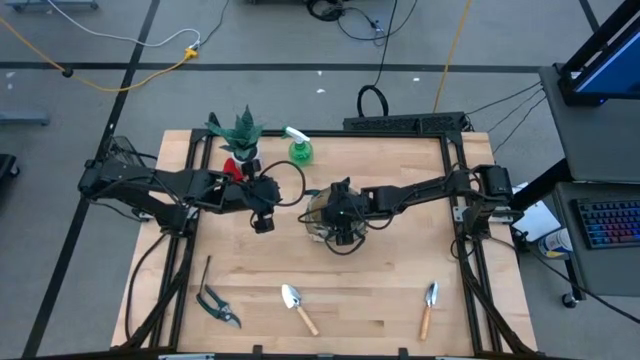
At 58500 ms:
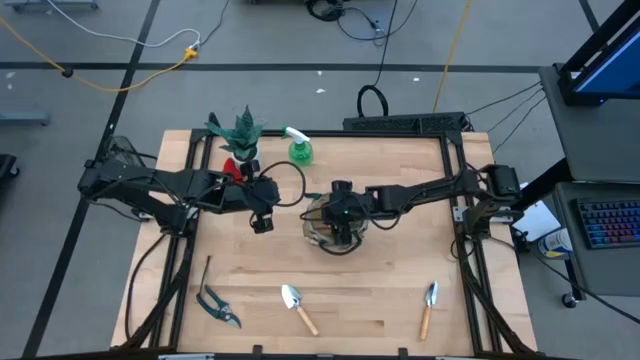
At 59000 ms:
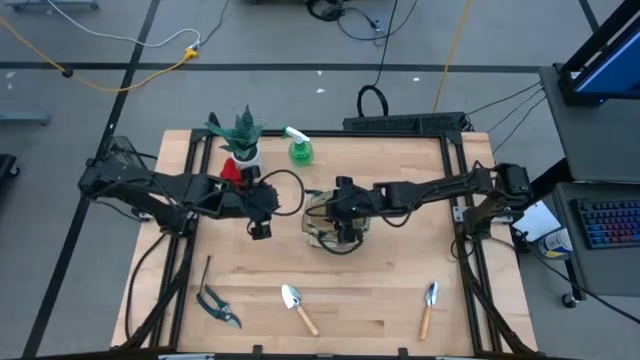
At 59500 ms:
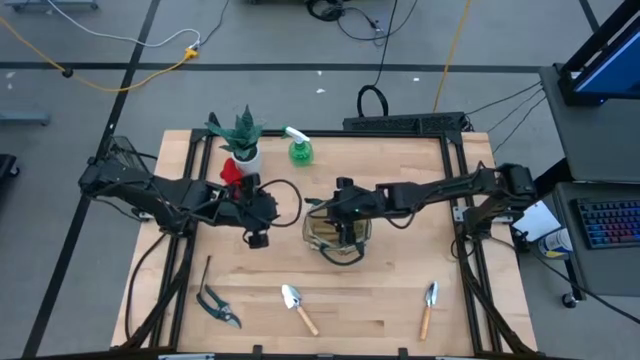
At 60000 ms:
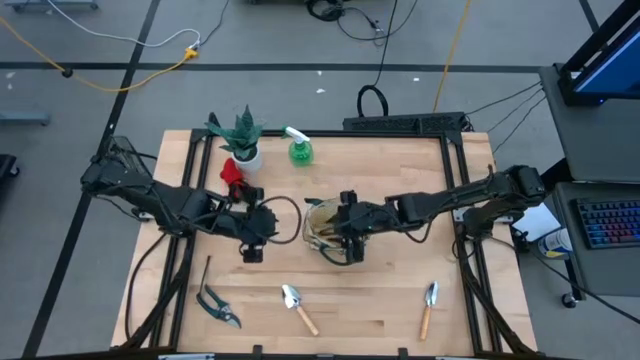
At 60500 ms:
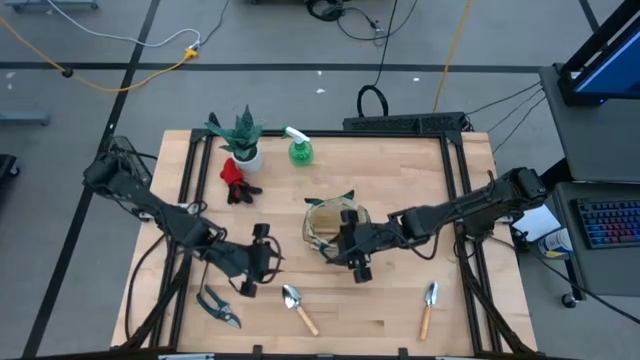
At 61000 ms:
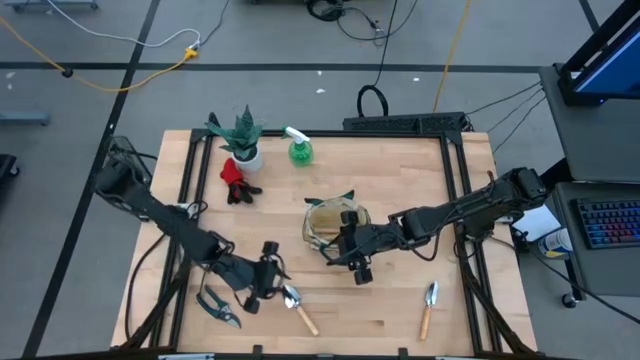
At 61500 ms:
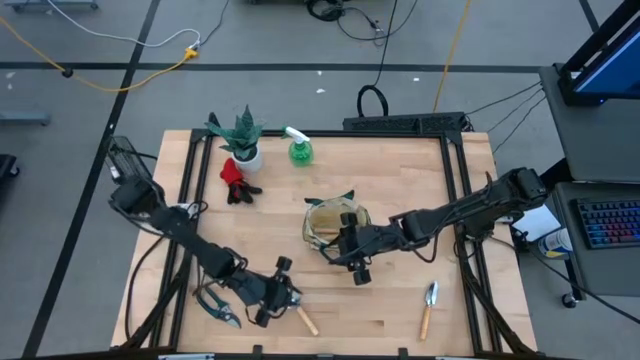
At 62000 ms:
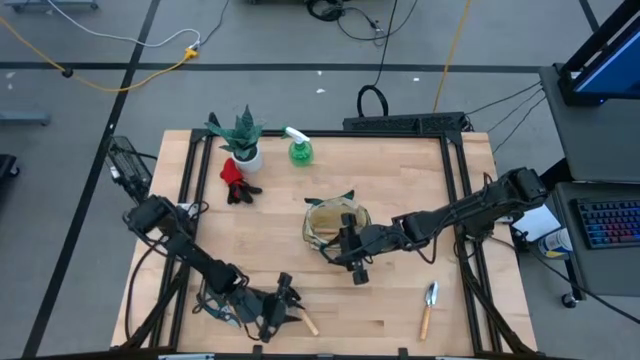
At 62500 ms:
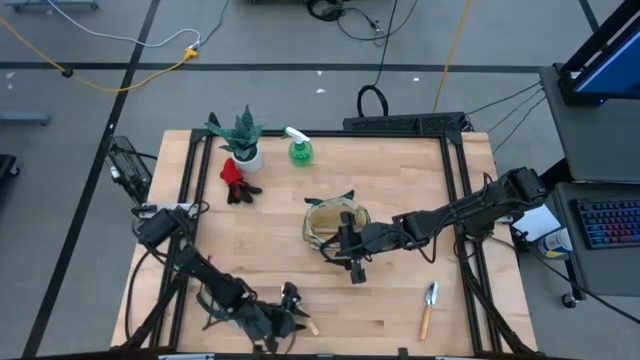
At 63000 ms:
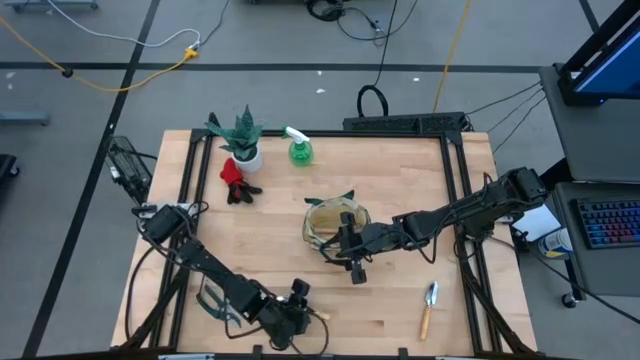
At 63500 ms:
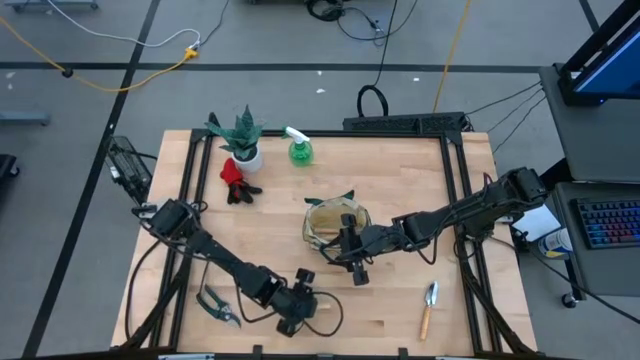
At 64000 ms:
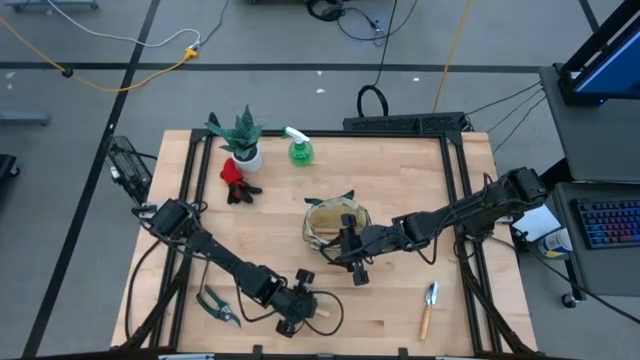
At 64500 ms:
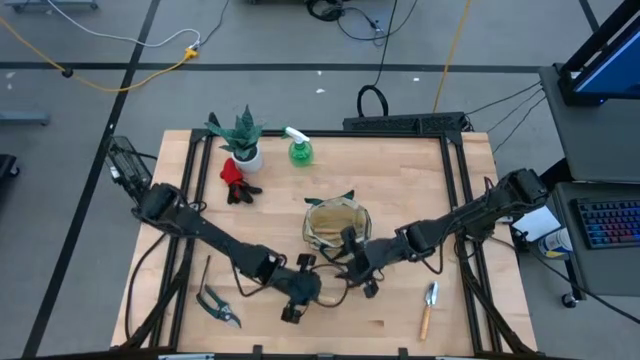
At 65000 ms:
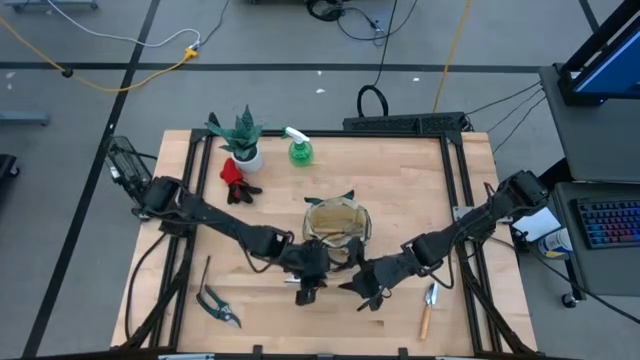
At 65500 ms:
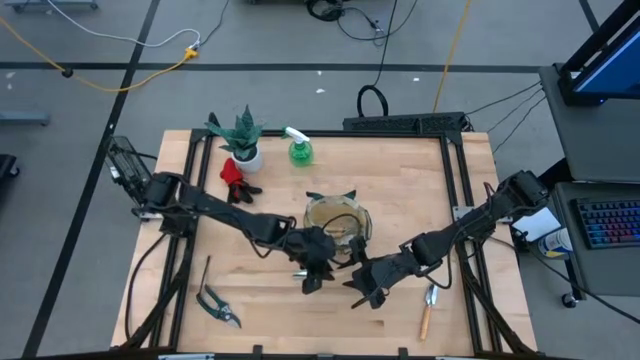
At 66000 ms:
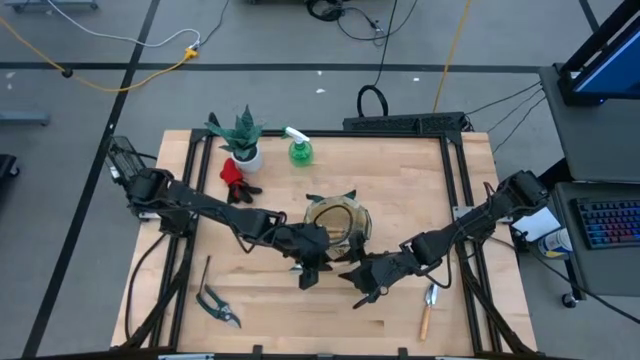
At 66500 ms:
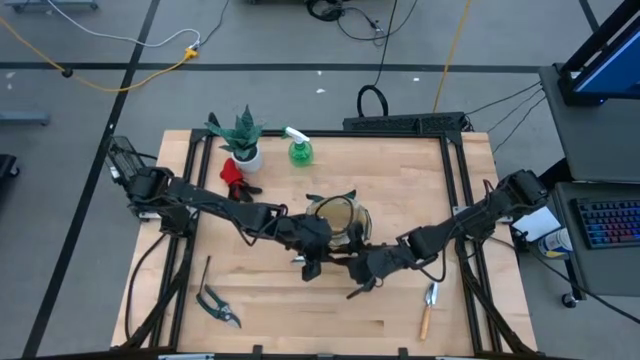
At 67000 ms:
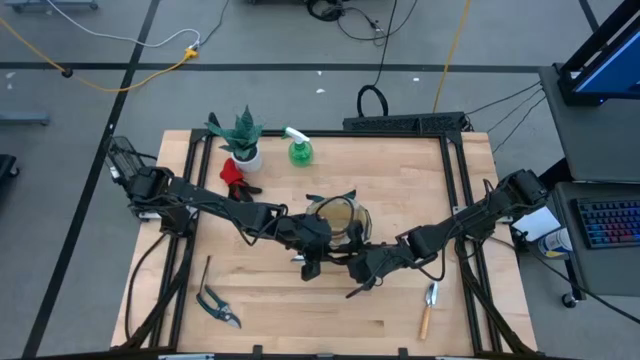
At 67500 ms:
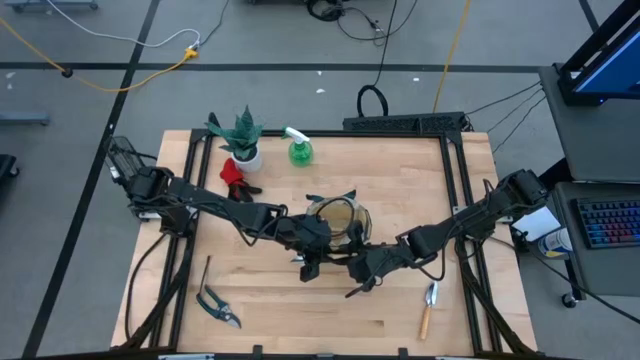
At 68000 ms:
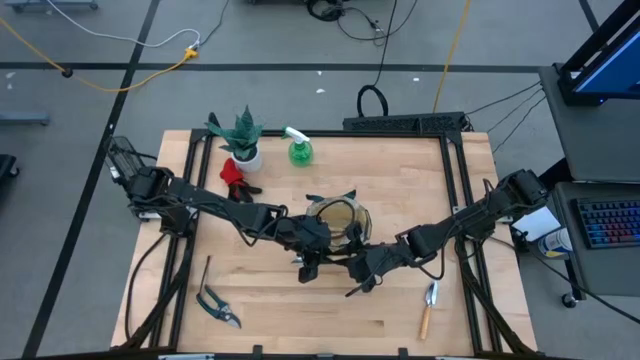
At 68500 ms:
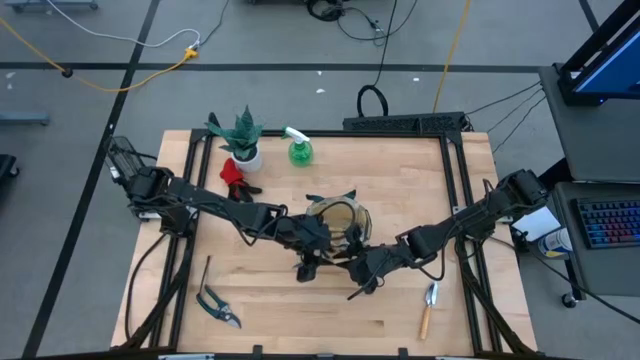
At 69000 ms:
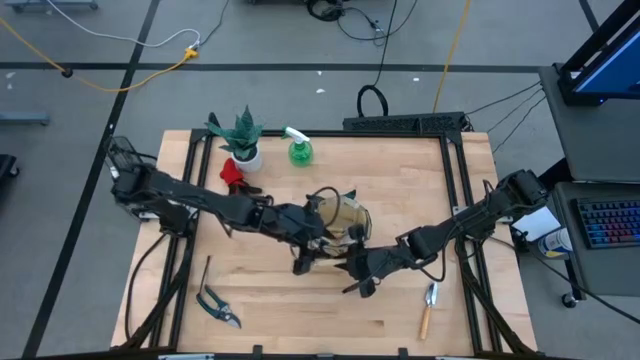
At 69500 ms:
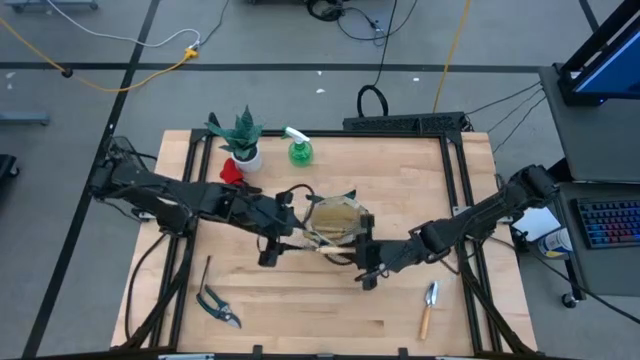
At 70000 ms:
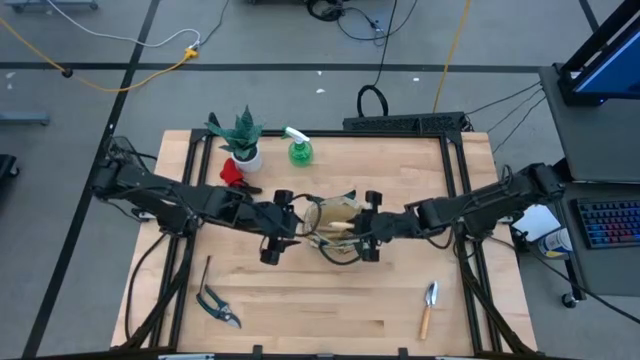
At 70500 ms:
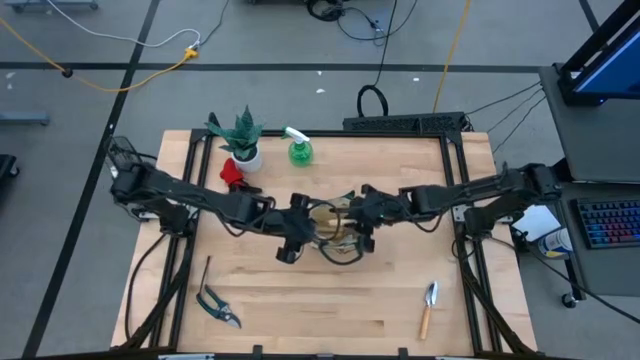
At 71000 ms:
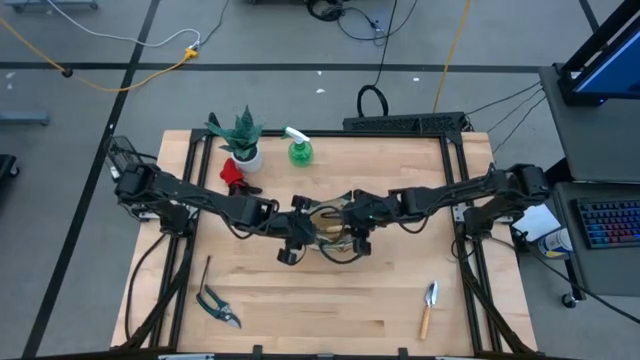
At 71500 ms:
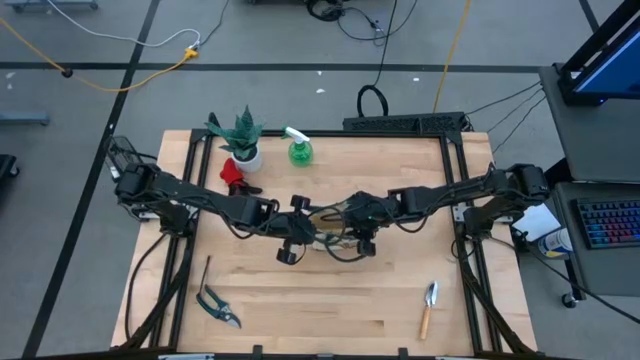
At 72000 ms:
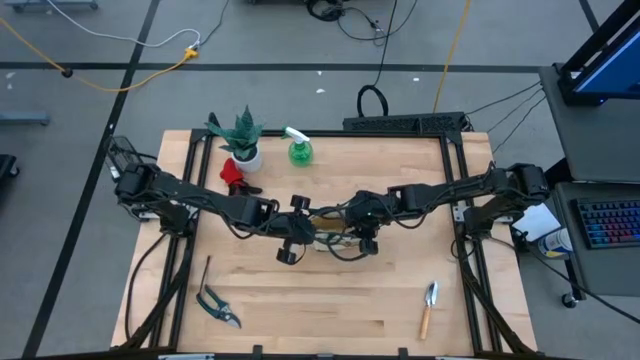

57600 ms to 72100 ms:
Task: Pick & Place Garden tools in Gardening bag
Put the light brown trowel into the gardening bag

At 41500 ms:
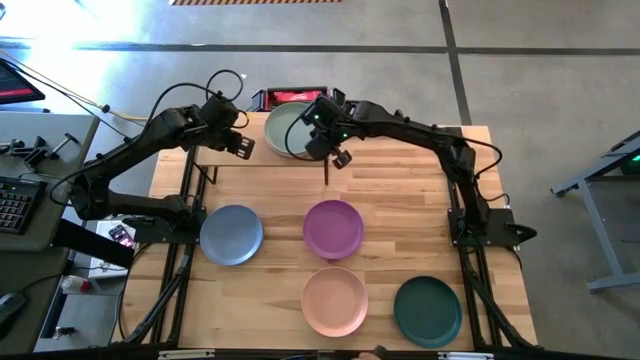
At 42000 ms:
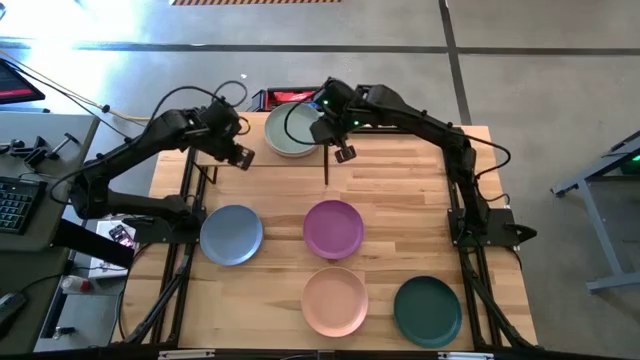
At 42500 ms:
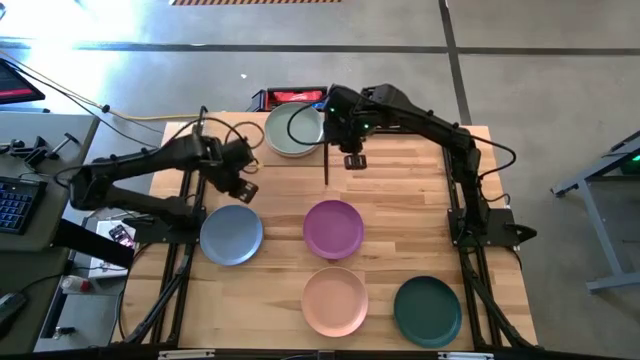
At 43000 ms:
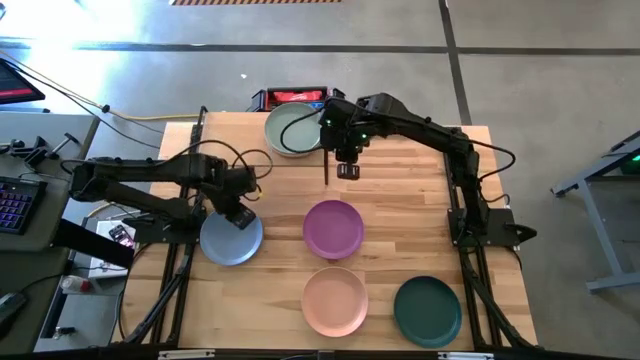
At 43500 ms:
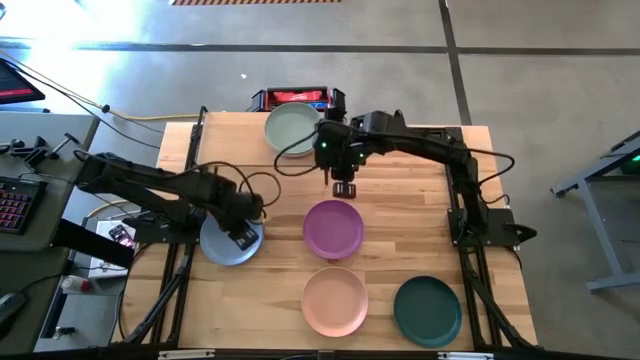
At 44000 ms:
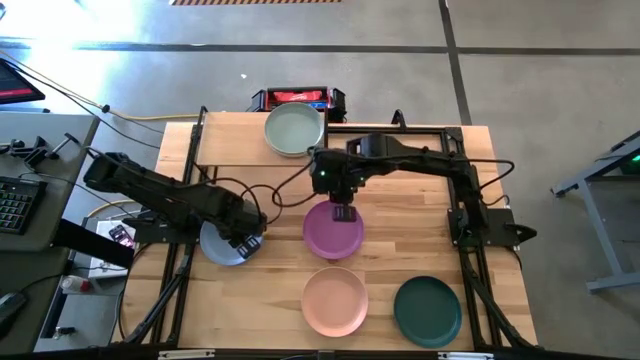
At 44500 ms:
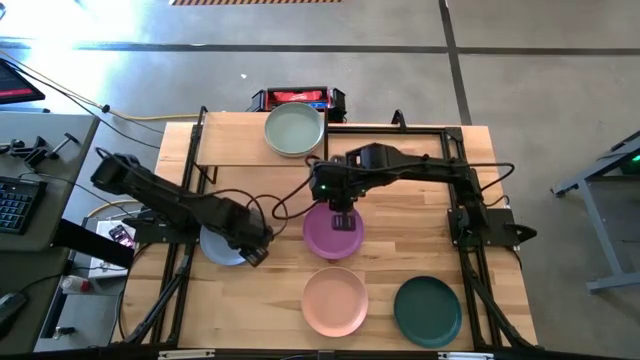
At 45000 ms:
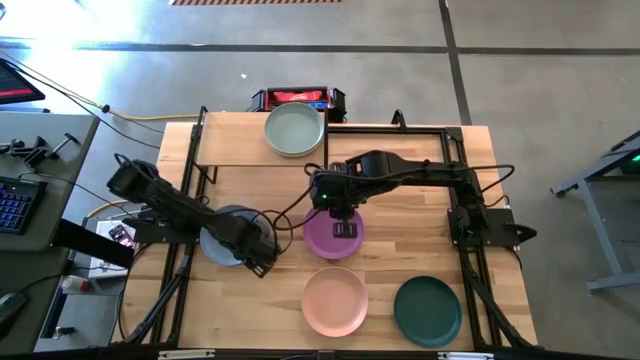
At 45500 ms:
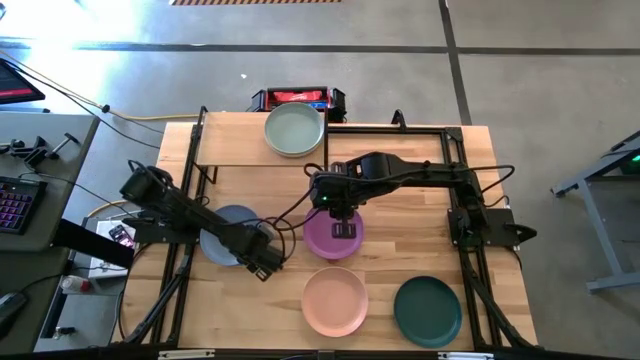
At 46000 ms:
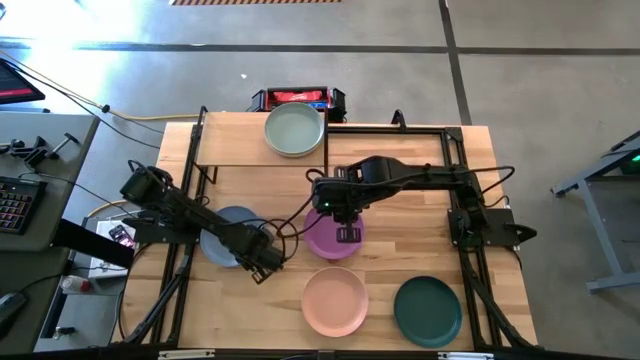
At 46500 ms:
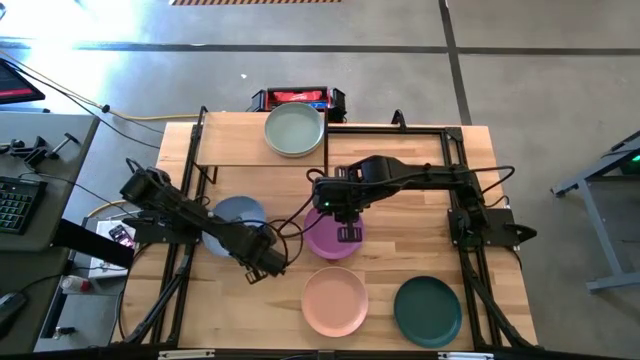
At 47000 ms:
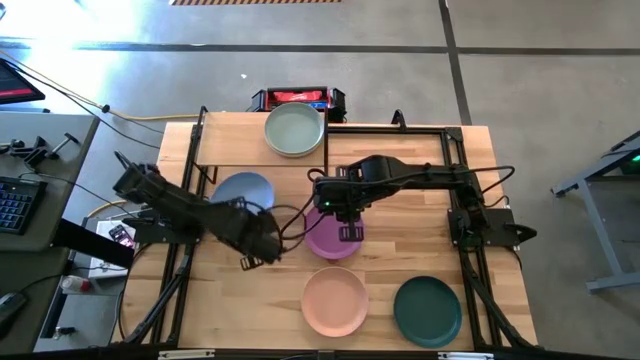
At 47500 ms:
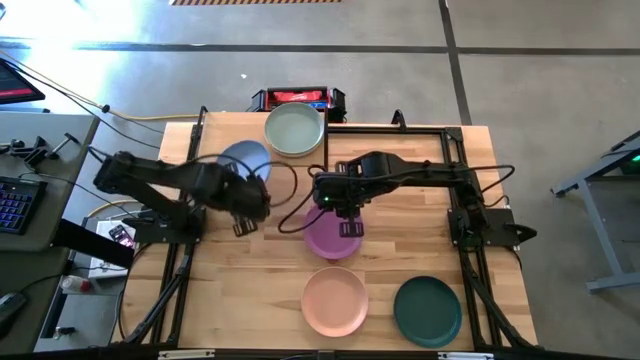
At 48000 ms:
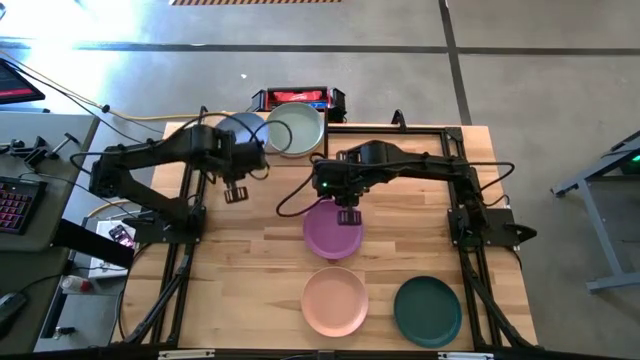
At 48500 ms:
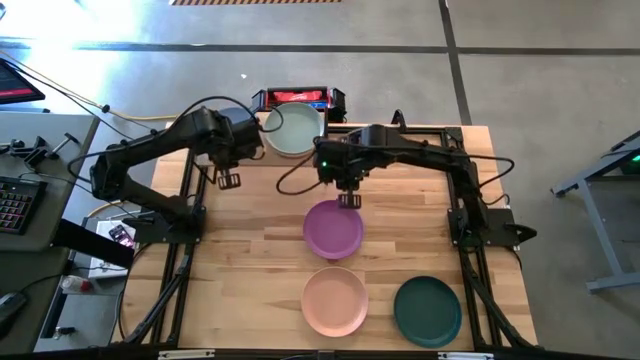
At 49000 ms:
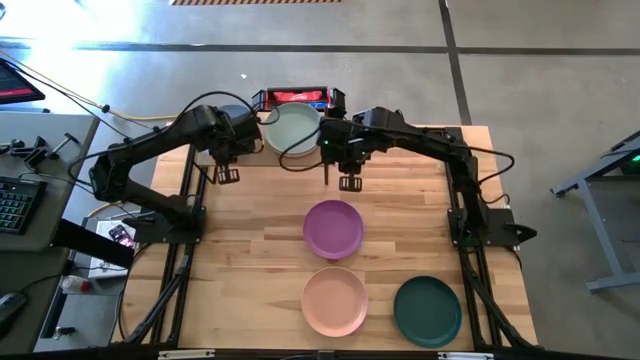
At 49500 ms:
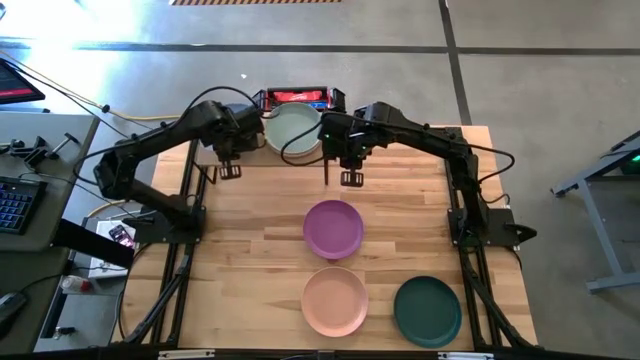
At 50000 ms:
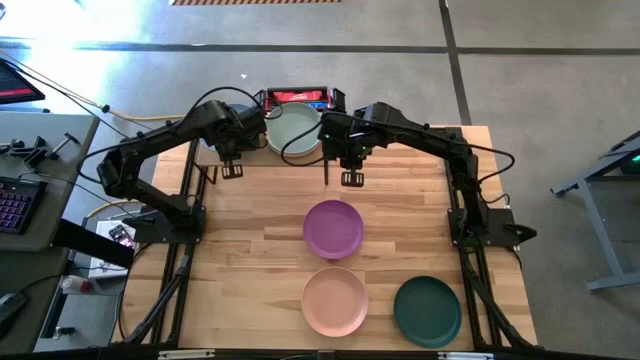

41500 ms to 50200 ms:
Task: Place and stack plates onto a shelf
Put the blue plate on the shelf
